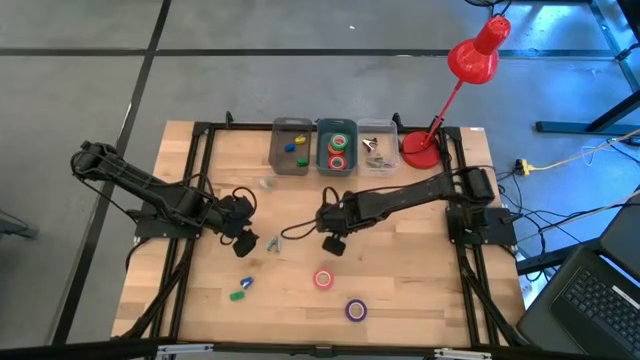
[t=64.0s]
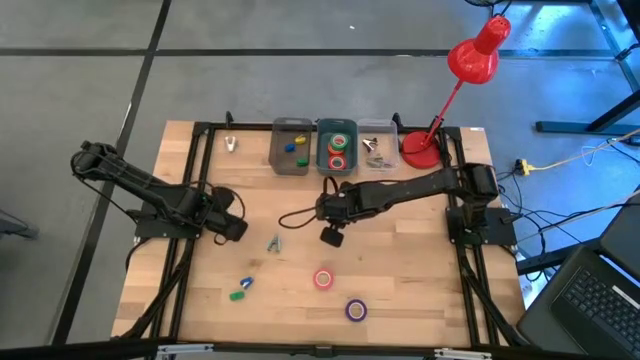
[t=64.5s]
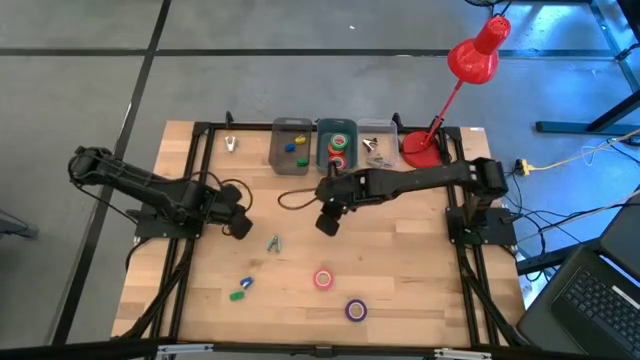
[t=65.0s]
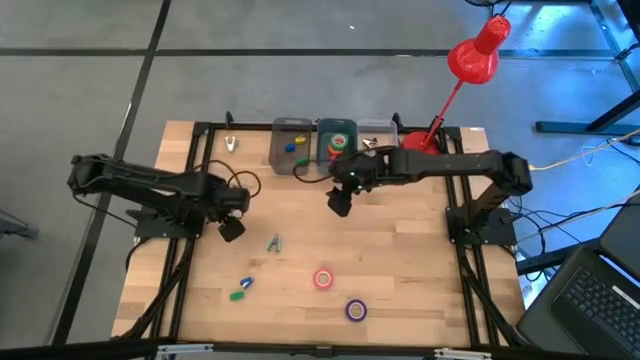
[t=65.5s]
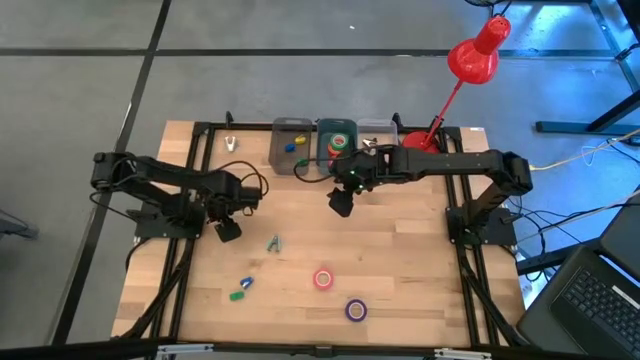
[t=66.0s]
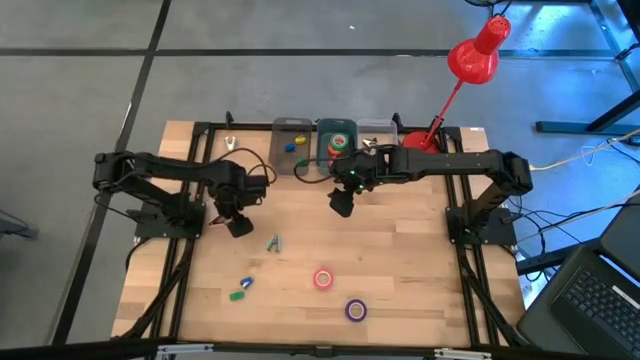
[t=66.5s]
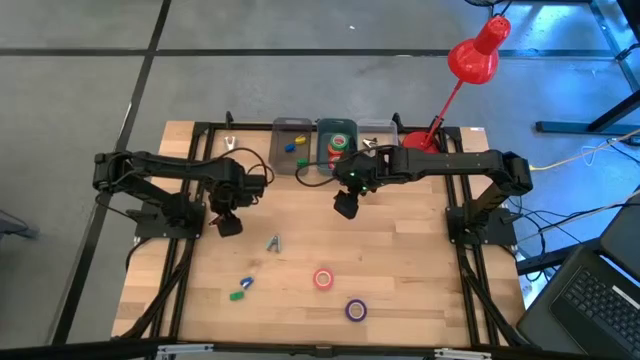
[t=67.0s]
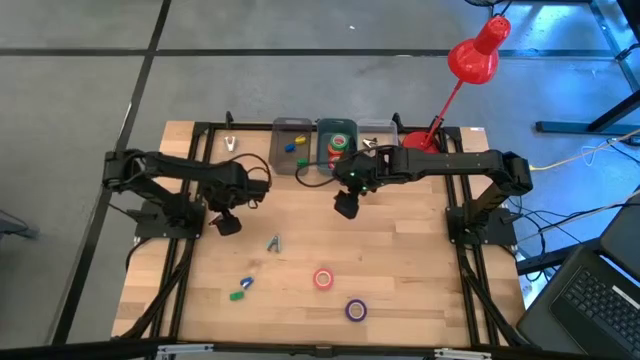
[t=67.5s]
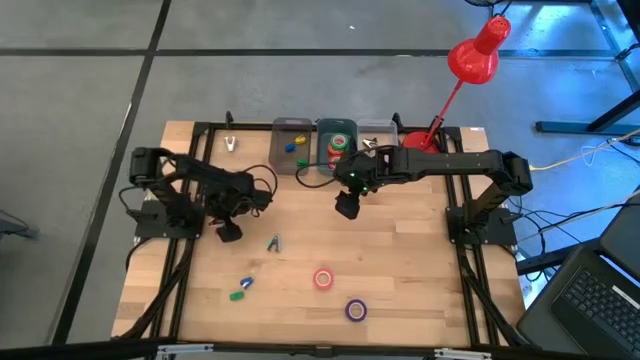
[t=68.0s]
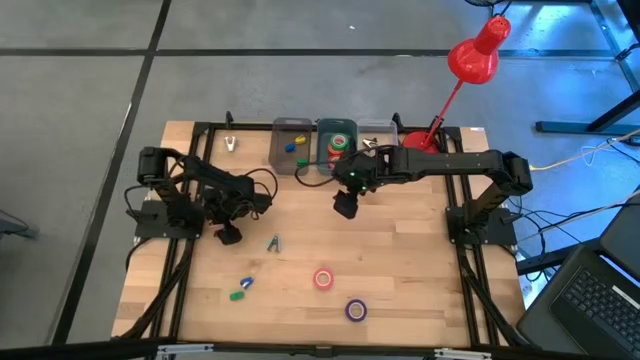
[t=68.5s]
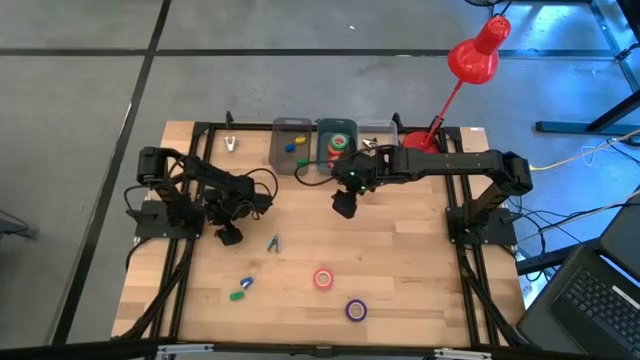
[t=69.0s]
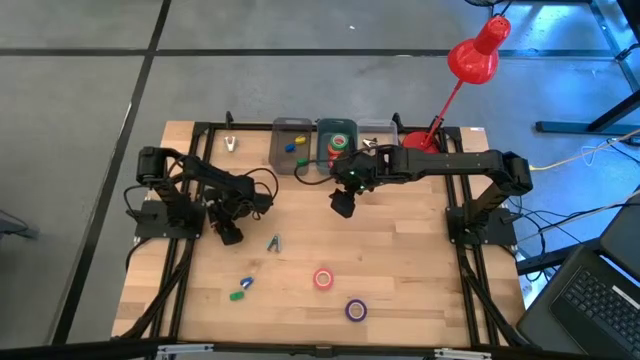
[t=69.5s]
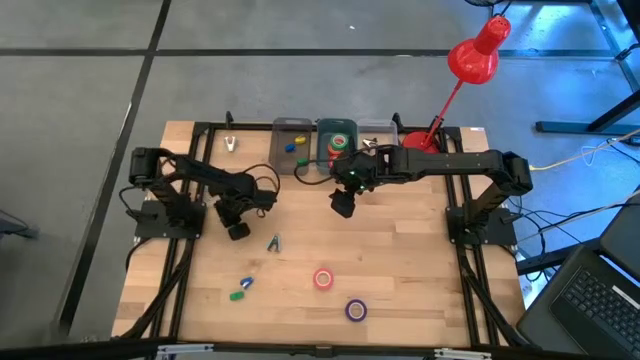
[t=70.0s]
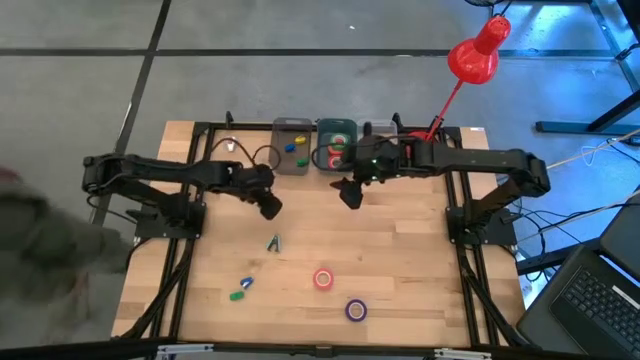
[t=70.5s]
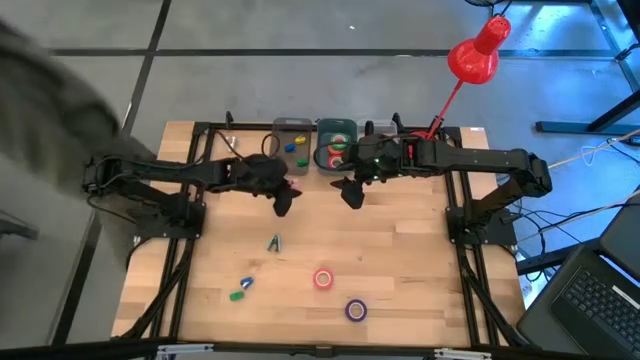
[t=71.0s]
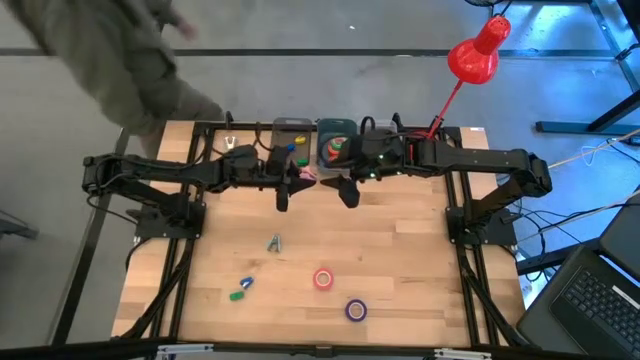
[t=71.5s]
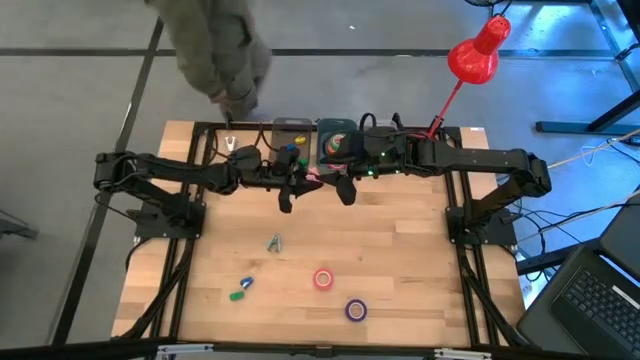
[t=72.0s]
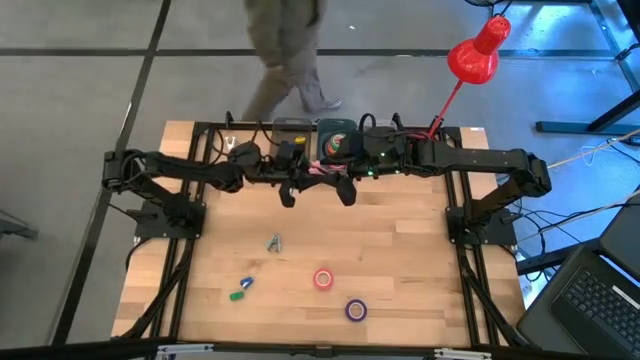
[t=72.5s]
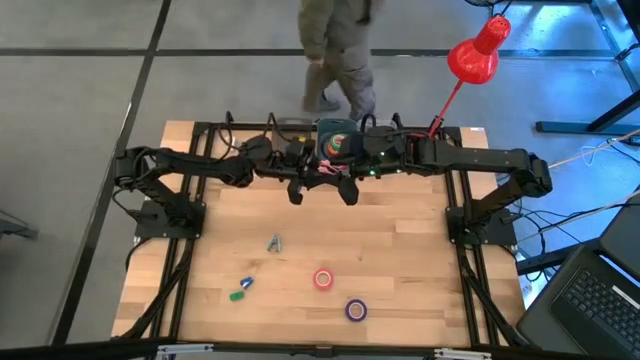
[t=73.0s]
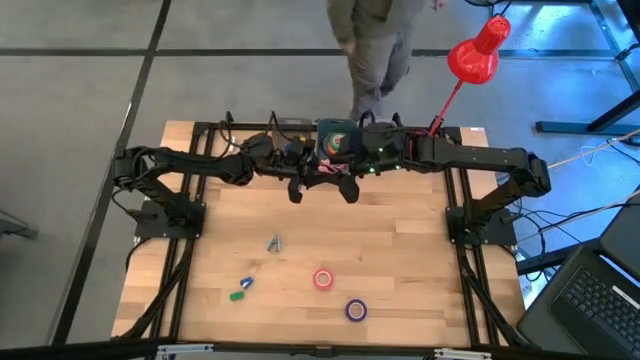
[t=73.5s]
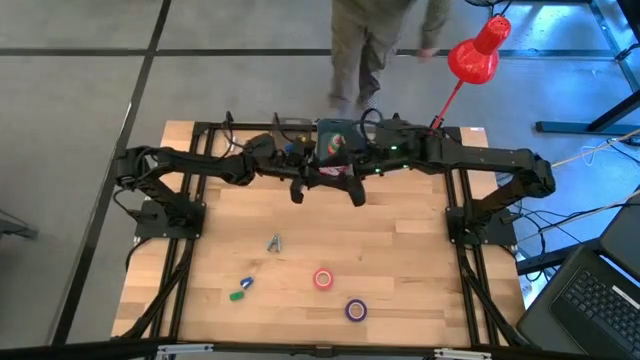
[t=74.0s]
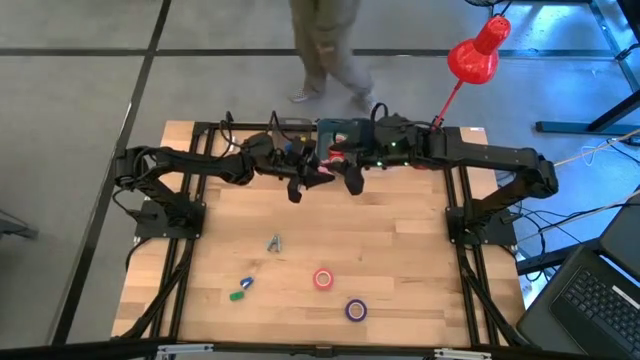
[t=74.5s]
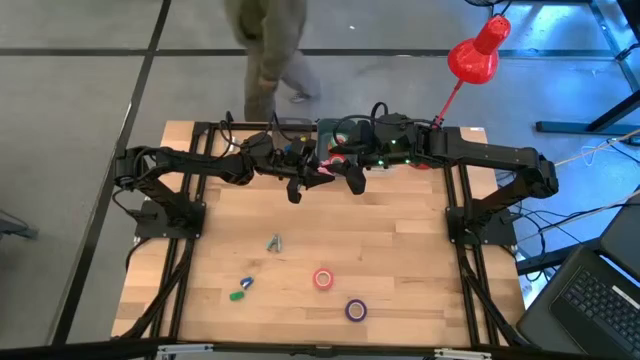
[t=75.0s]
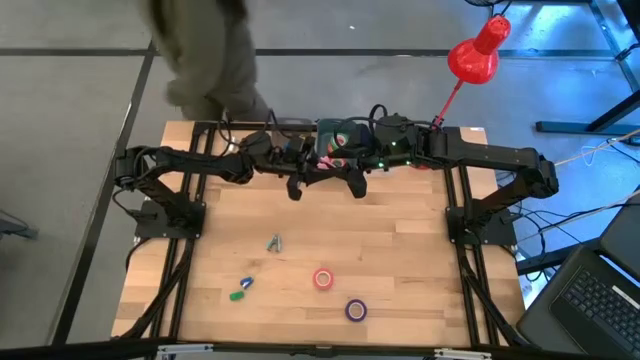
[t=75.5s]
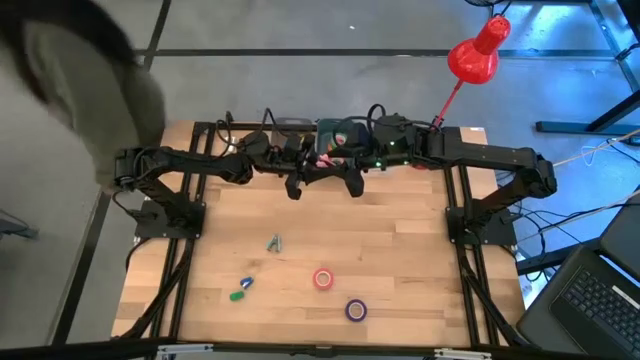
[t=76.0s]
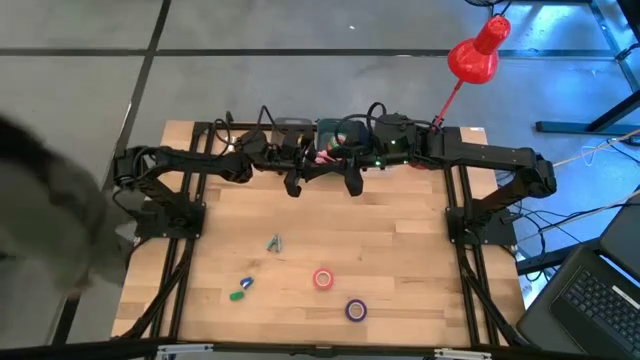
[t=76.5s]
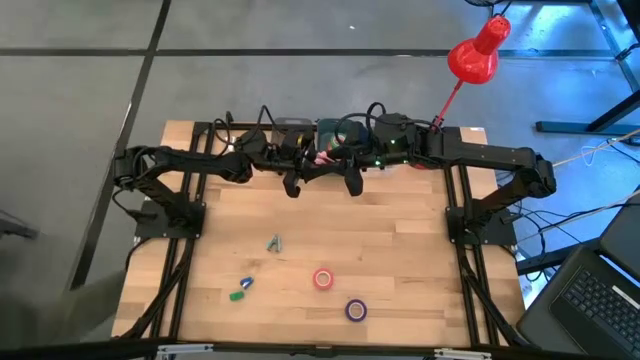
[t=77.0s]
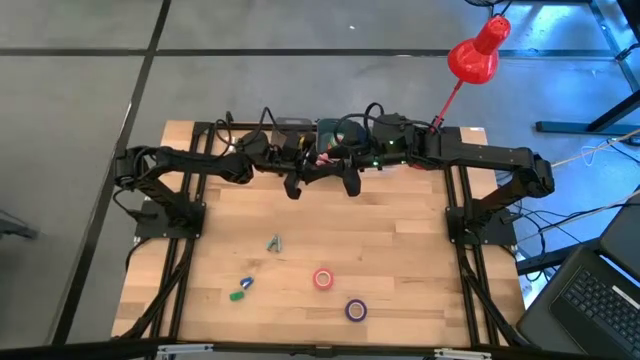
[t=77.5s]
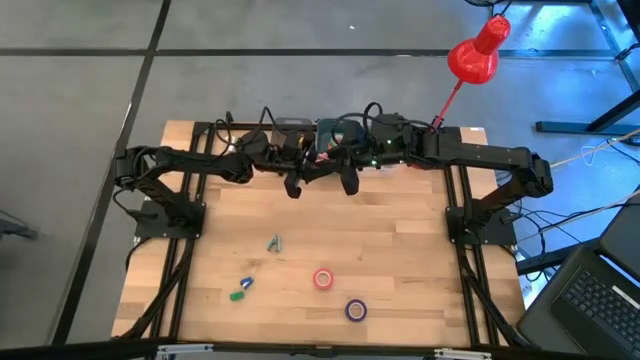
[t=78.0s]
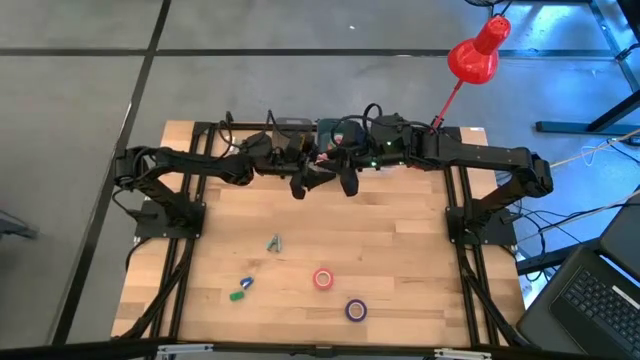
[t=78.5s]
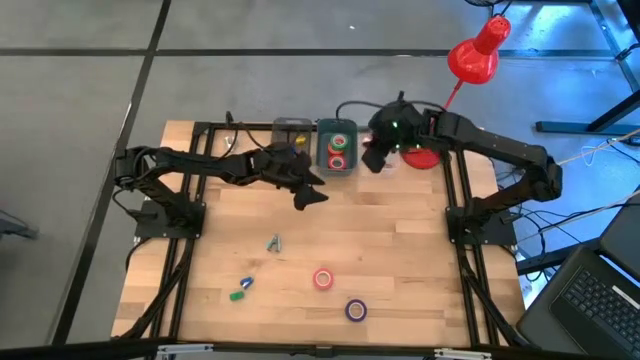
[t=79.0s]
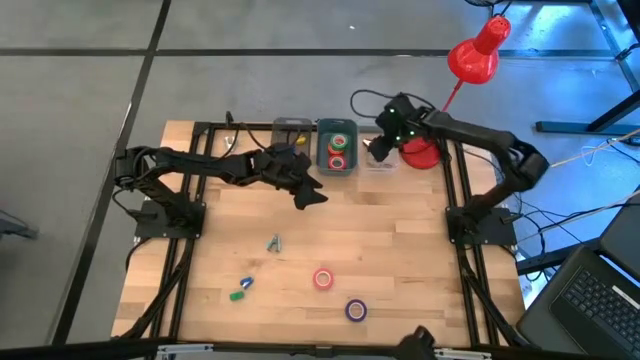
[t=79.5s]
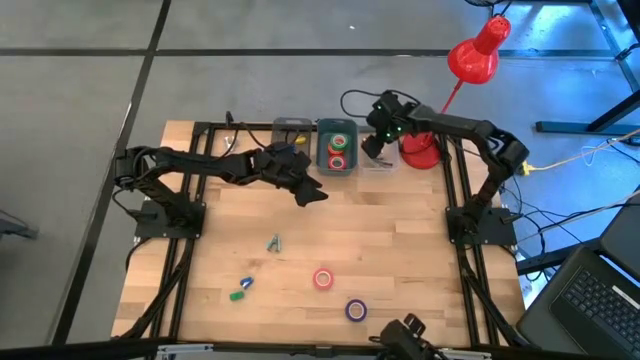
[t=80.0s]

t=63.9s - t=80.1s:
Task: Pick and place Stapler, Stapler remover, tape
Put the pink staple remover into the transparent bin

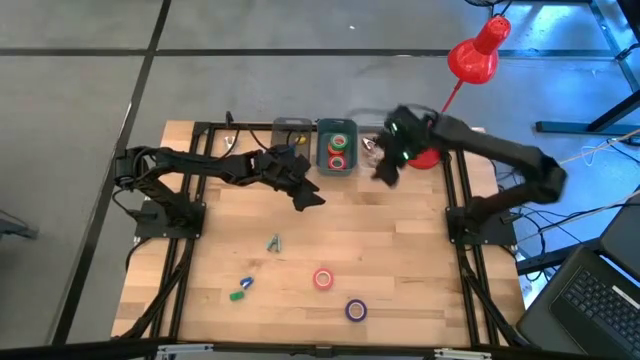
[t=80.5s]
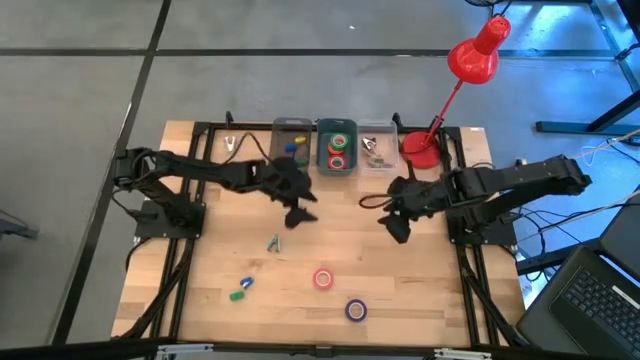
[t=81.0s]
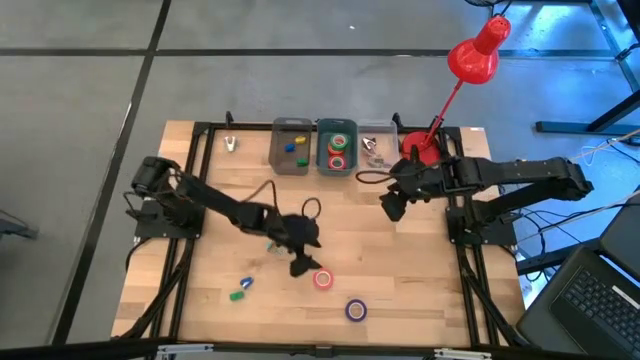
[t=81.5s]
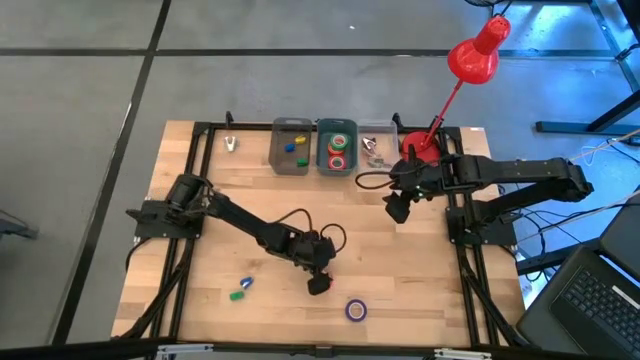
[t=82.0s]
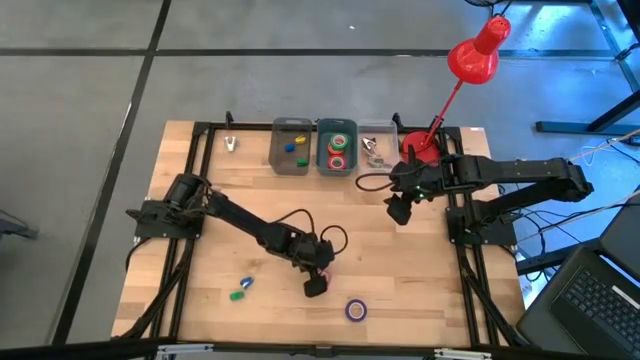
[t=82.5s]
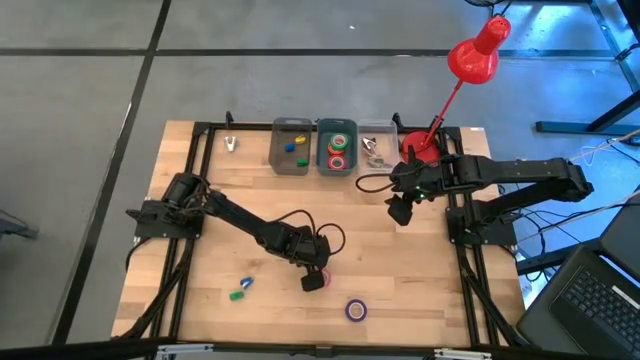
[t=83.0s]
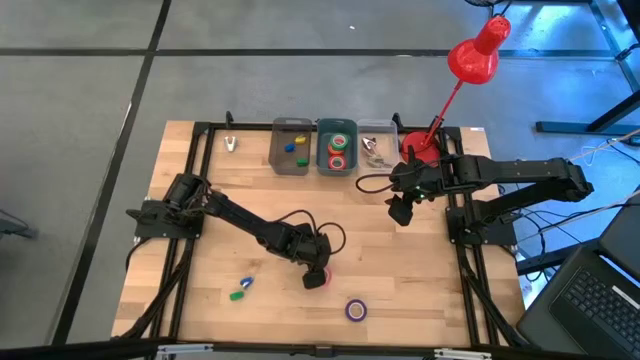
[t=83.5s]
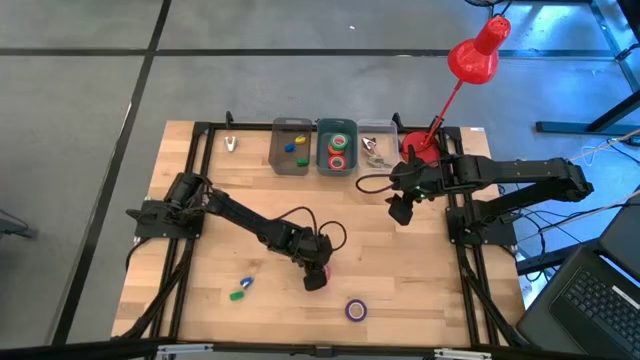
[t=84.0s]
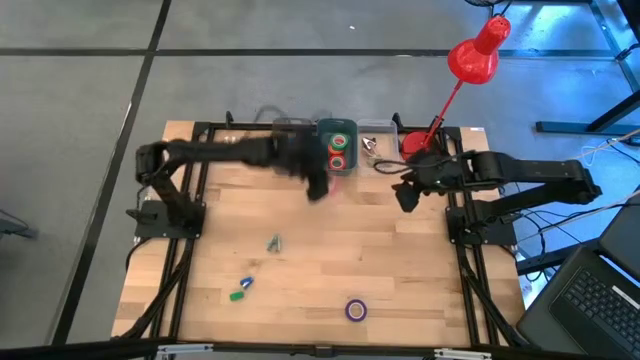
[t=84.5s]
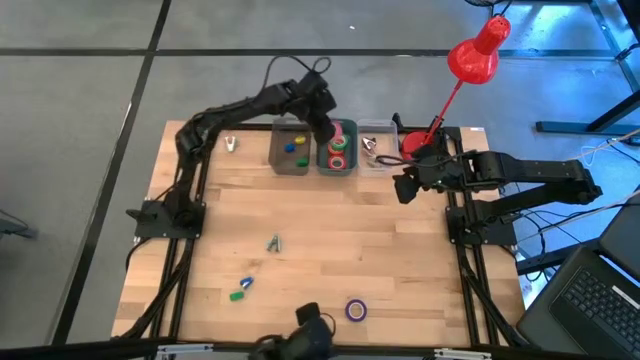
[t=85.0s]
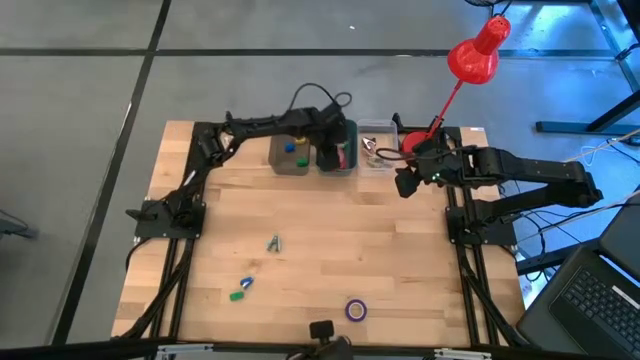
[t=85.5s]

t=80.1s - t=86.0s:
Put the pink tape into the green bin
